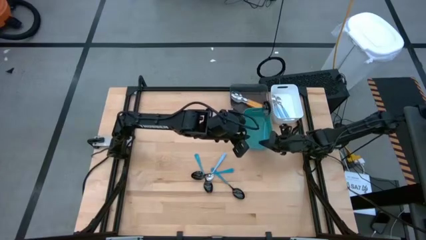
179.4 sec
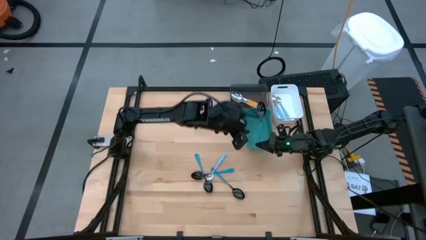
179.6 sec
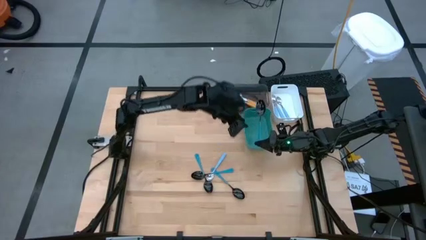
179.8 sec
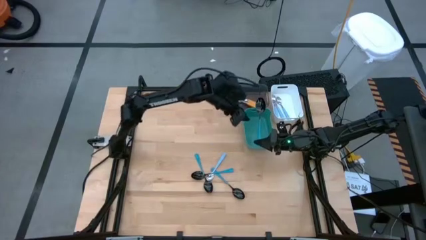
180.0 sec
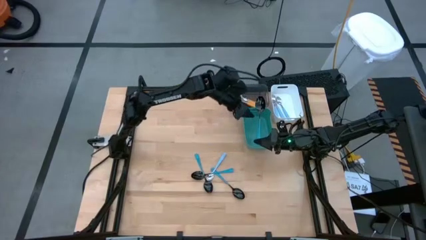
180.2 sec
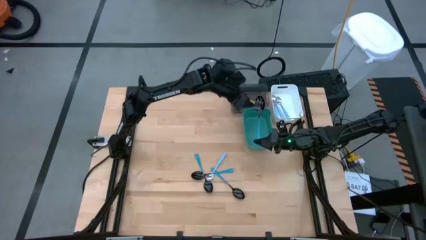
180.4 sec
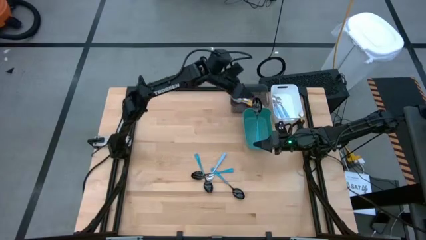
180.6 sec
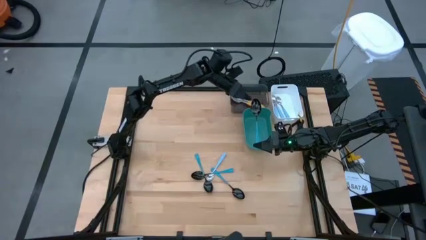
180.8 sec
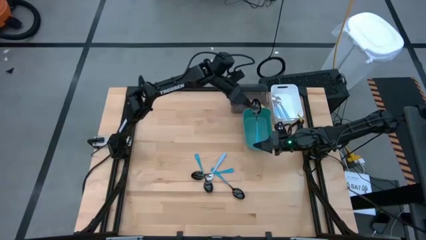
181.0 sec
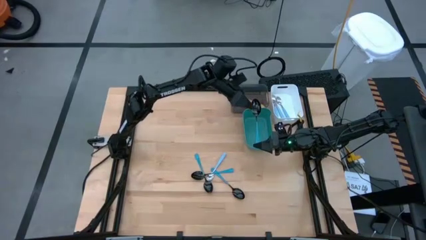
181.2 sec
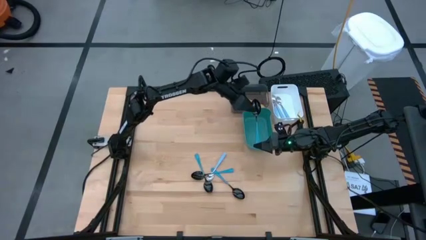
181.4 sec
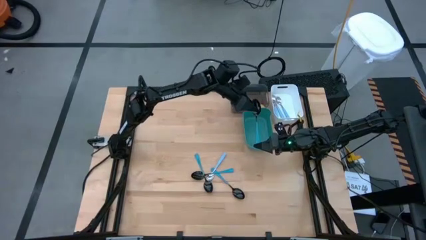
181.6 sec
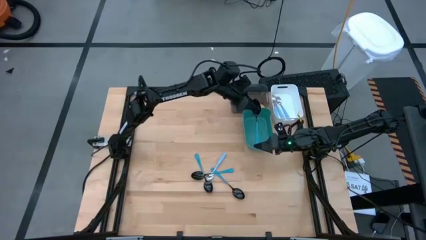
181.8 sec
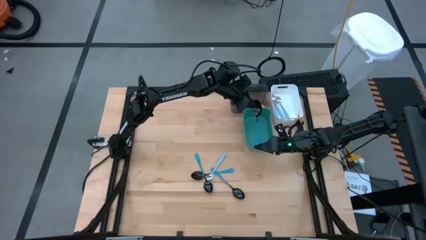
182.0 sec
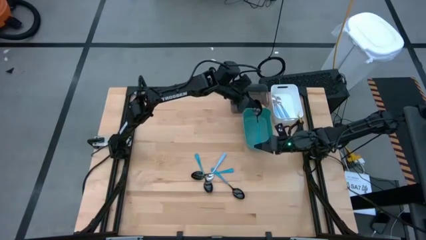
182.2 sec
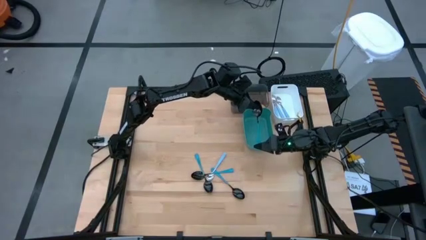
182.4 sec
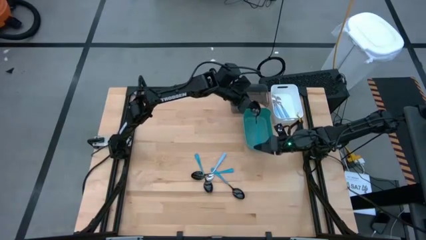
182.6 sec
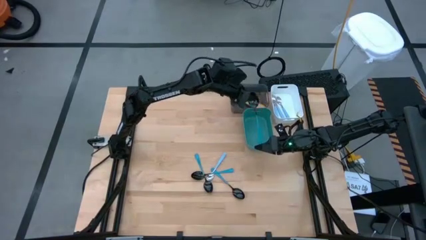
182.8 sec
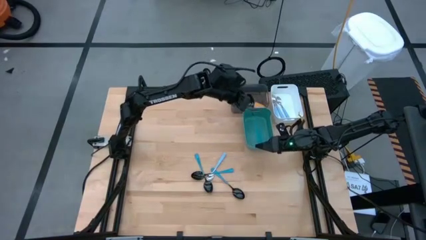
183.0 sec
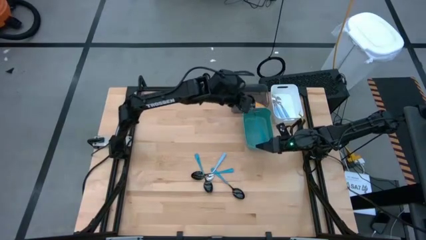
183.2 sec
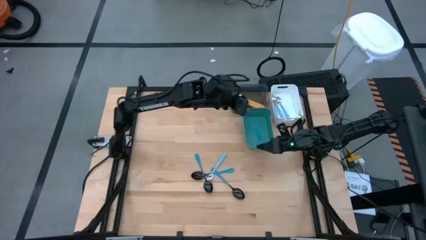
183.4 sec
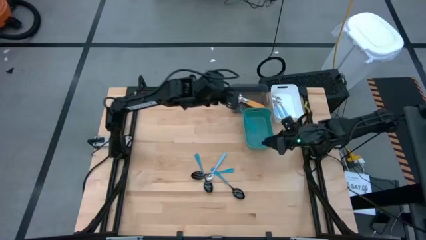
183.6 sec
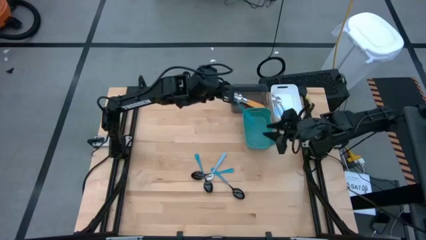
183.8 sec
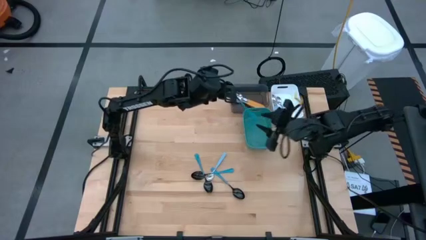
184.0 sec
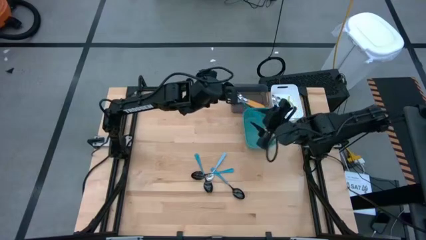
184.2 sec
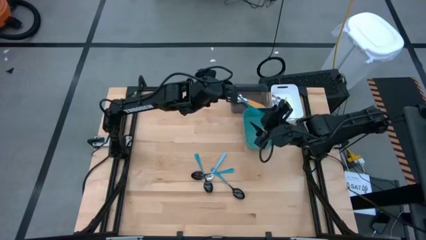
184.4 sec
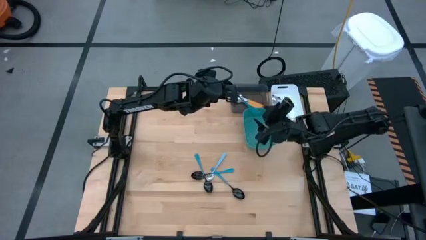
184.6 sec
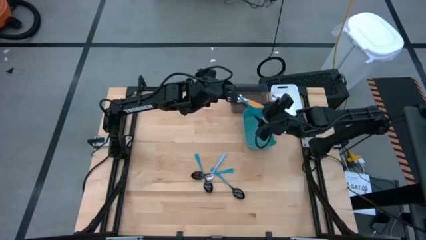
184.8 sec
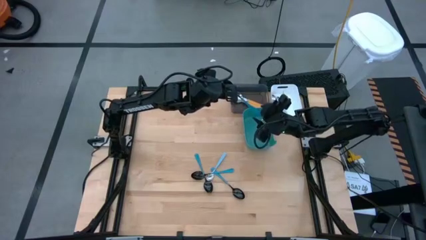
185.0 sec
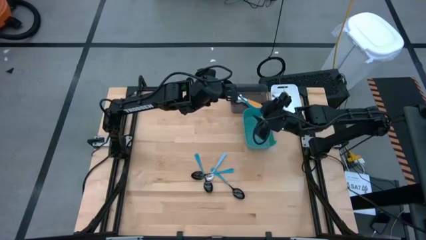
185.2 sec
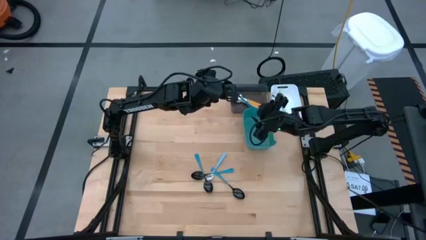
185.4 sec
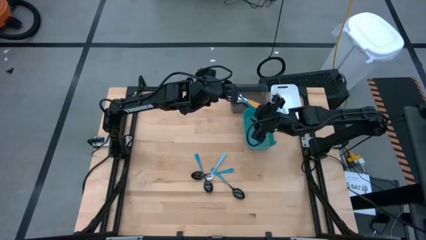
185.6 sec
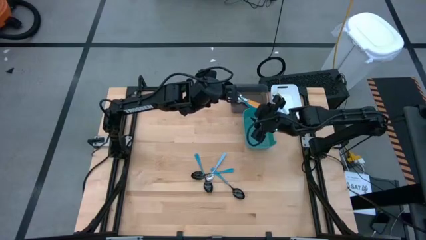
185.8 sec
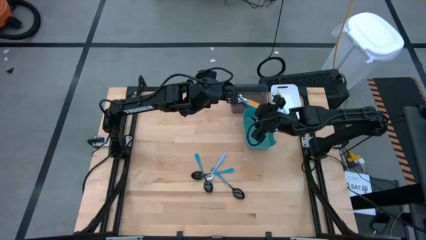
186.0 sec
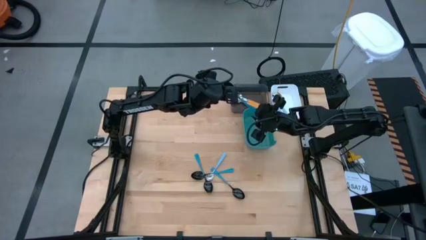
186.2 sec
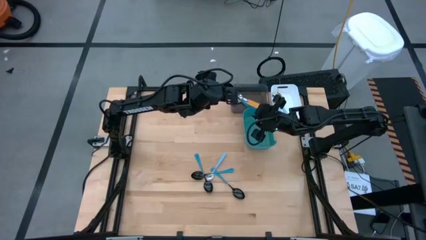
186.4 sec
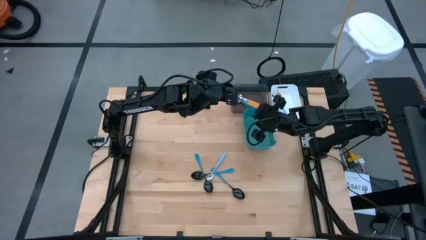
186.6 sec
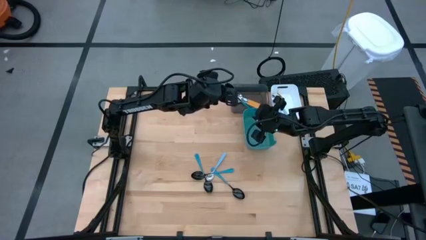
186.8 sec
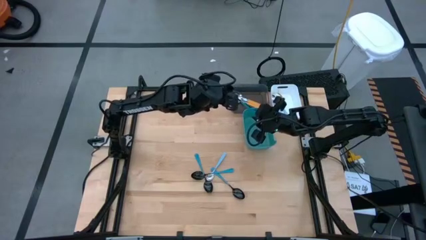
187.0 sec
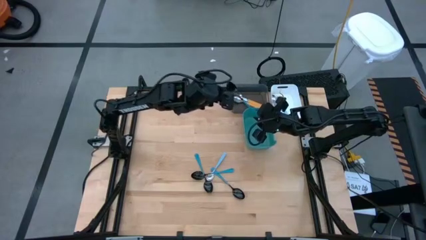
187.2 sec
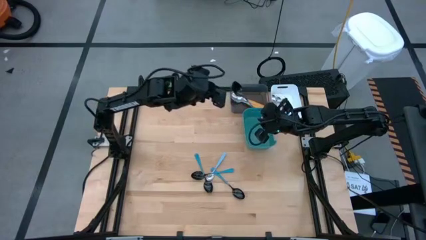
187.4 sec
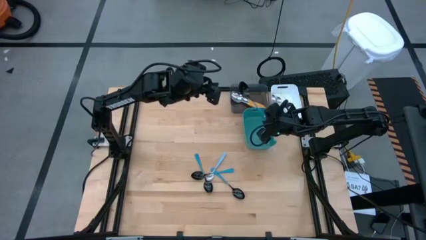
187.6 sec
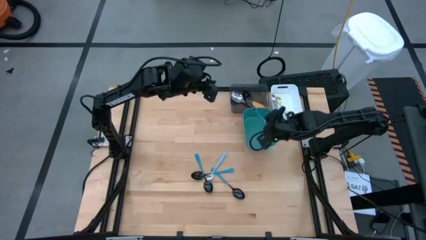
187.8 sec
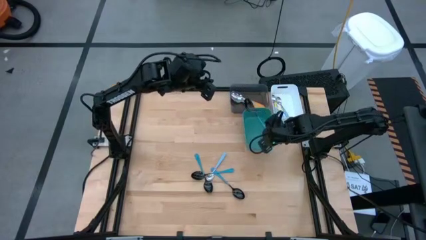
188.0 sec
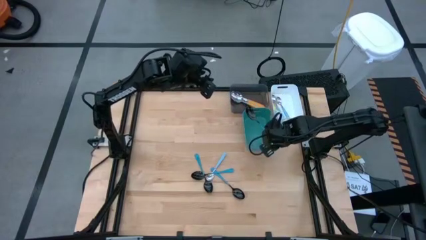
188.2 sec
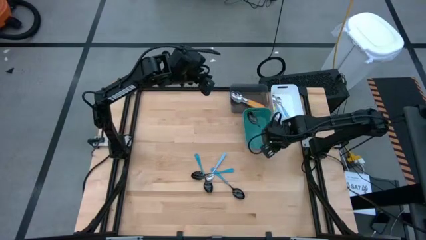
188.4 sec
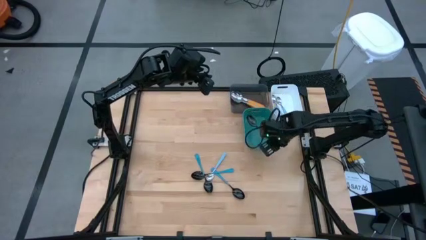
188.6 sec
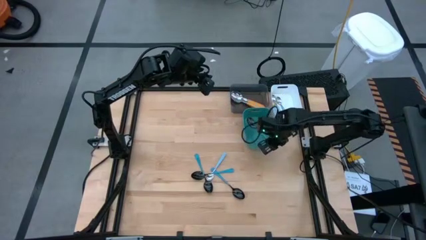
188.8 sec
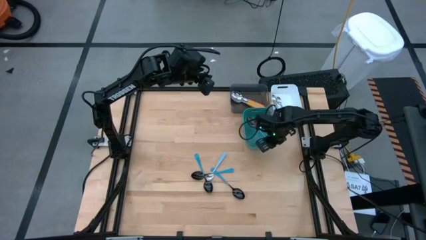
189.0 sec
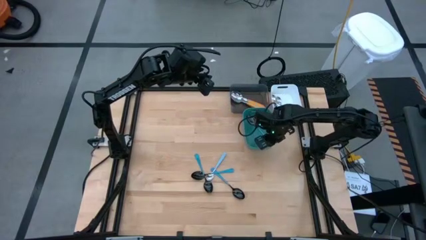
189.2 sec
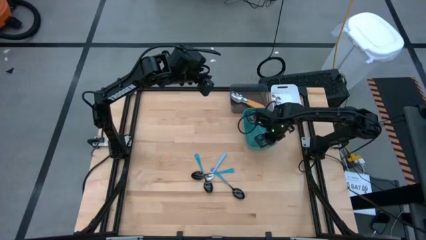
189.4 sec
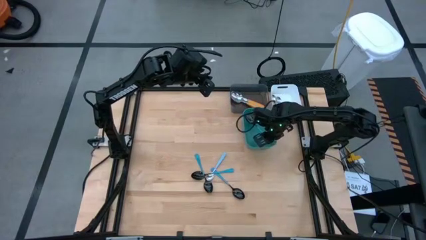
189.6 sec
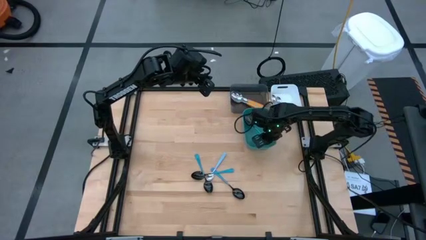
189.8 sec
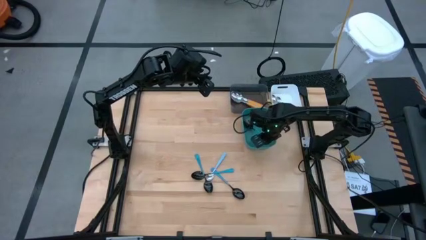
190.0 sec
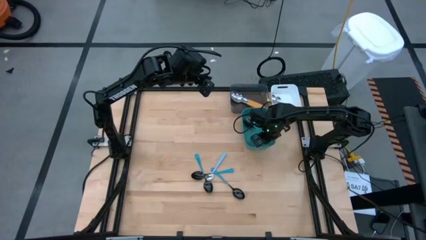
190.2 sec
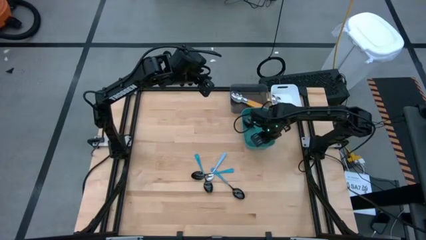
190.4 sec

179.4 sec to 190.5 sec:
Task: Sort silverware by color (type)
Put the blue spoon into the green bin

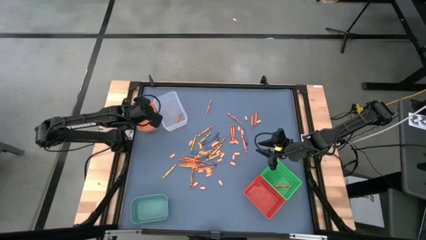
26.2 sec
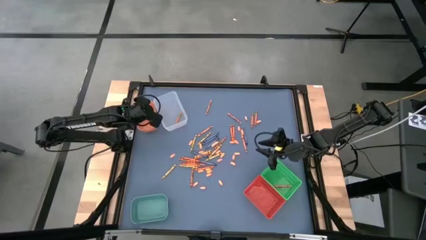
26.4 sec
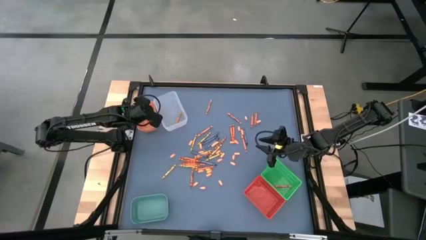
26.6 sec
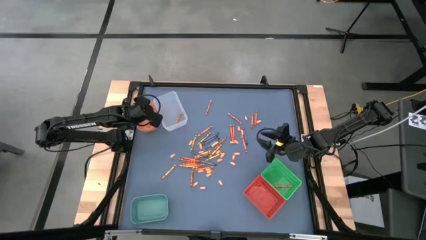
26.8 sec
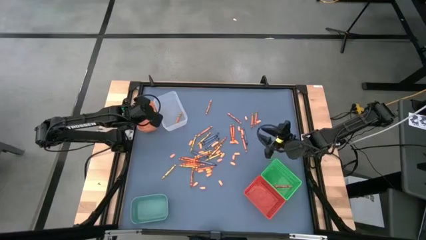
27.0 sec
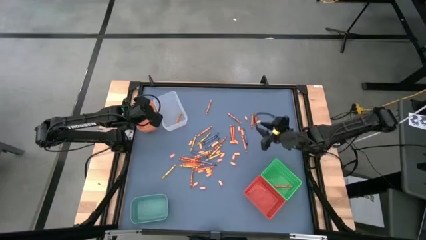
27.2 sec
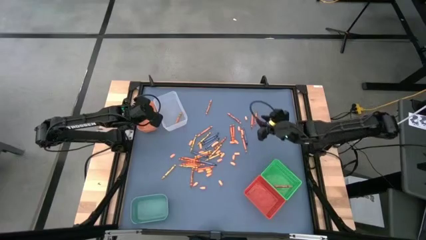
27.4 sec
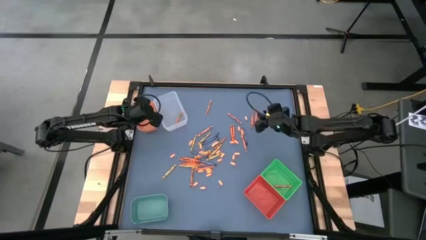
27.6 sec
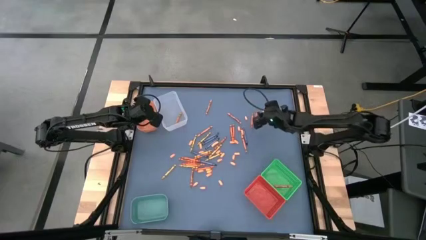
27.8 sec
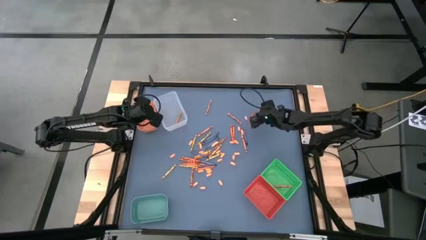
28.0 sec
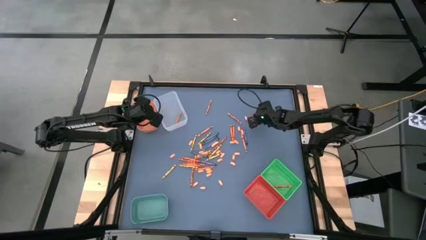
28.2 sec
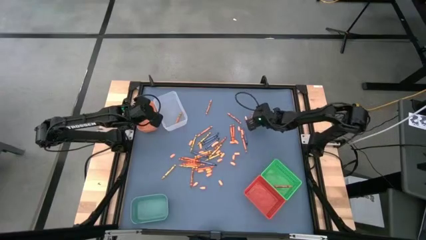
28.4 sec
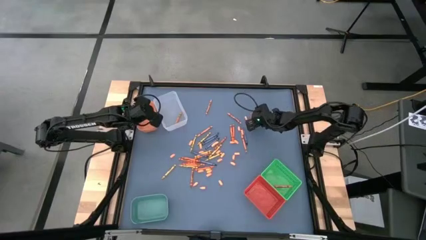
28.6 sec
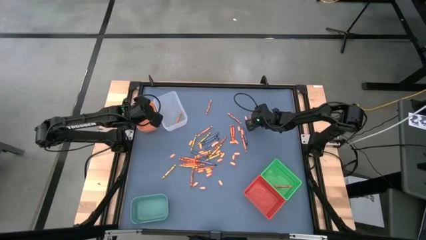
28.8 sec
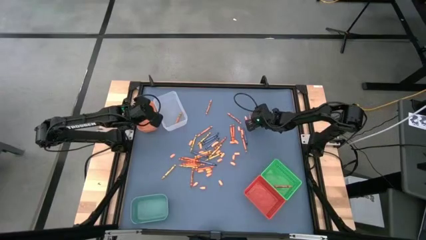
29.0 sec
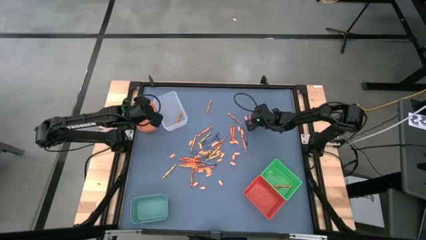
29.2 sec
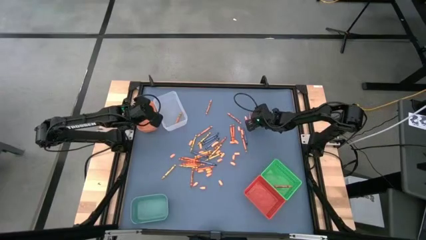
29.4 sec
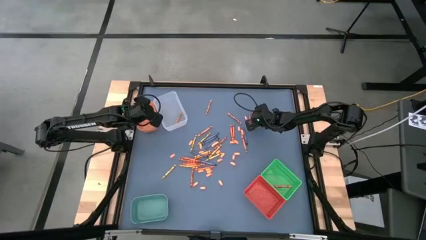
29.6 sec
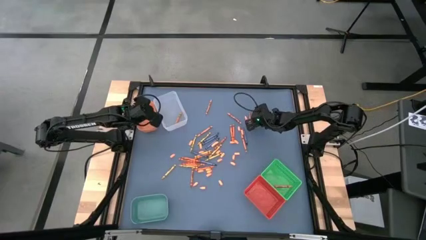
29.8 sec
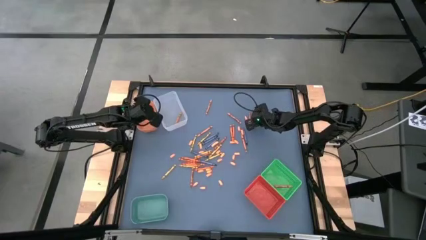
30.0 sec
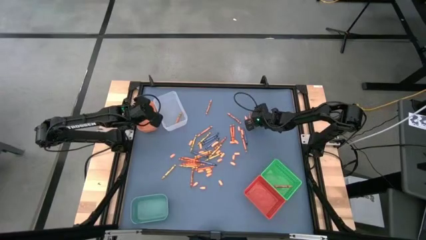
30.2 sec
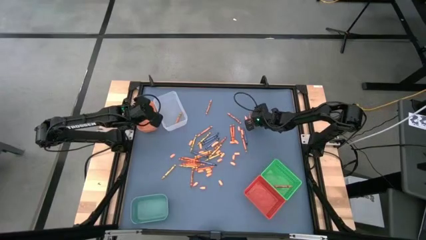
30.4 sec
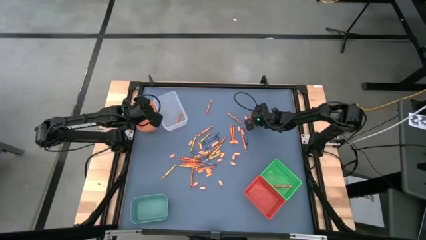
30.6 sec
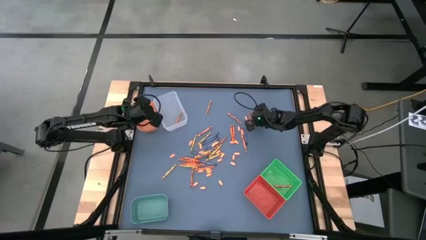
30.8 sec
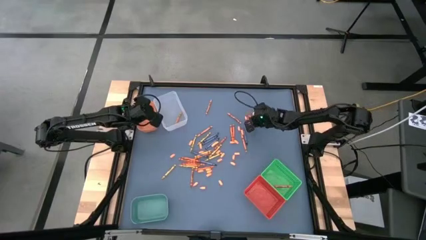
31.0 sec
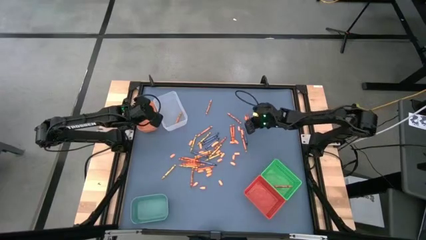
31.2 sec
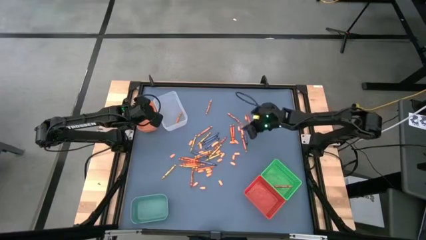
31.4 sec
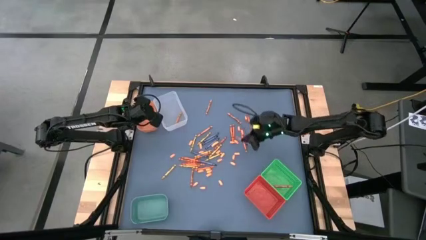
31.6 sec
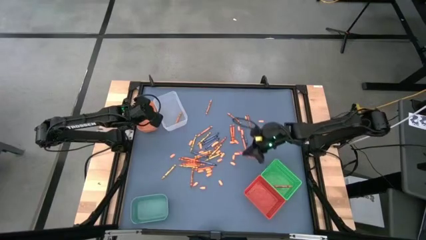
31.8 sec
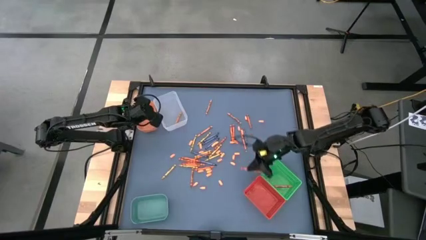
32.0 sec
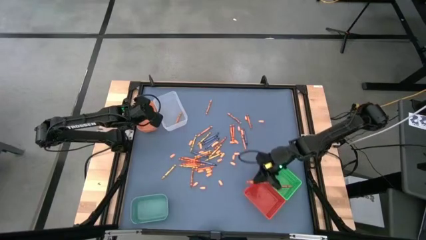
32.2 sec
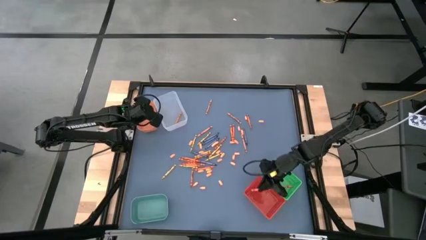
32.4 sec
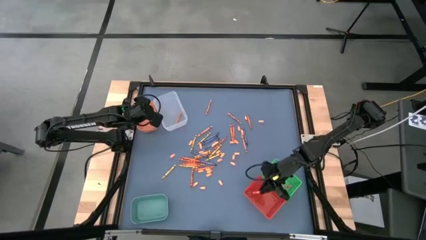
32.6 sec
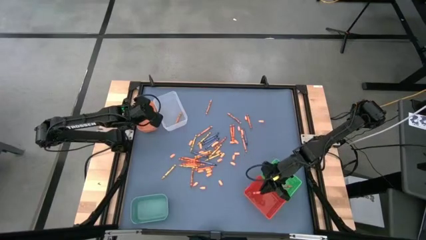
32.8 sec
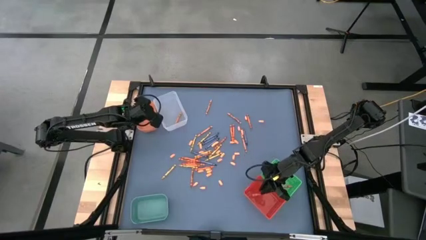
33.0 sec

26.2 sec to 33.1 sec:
Task: Sort crayons
Put the red crayon into the red bin
